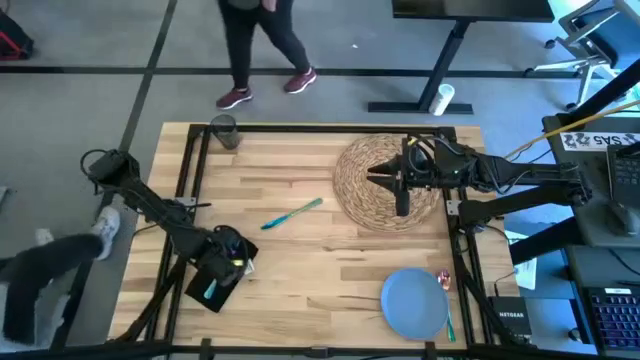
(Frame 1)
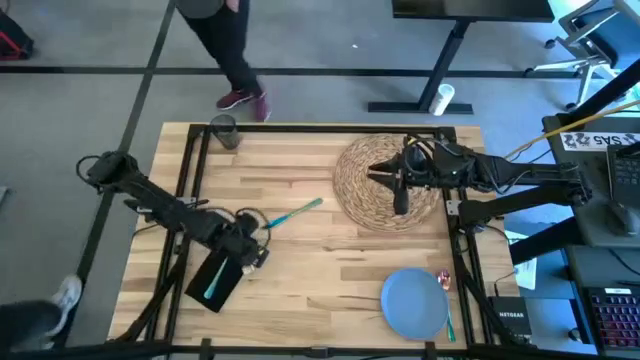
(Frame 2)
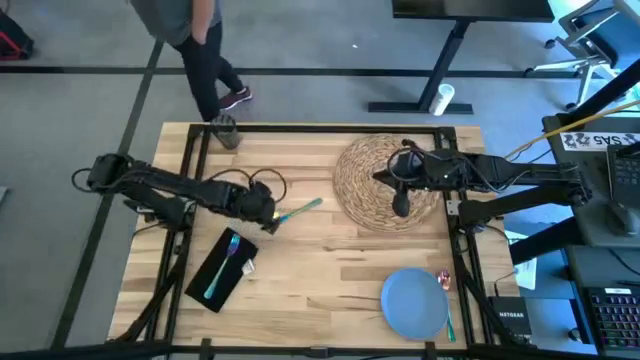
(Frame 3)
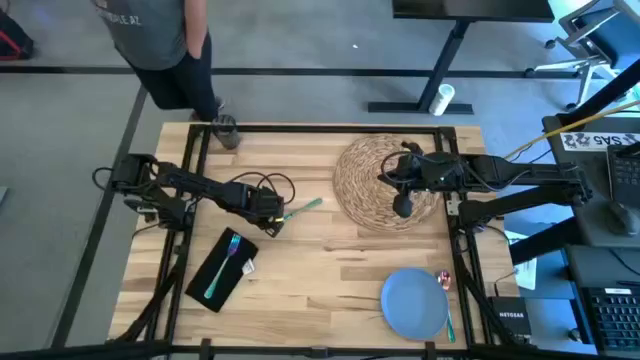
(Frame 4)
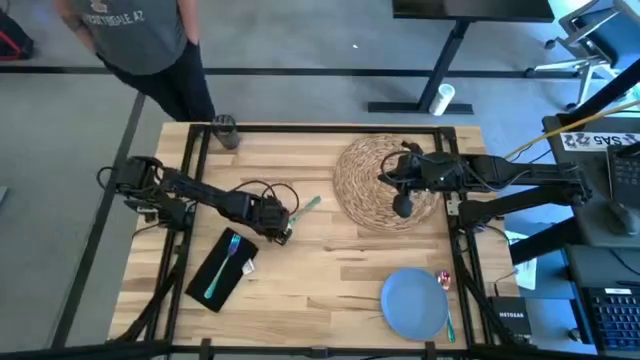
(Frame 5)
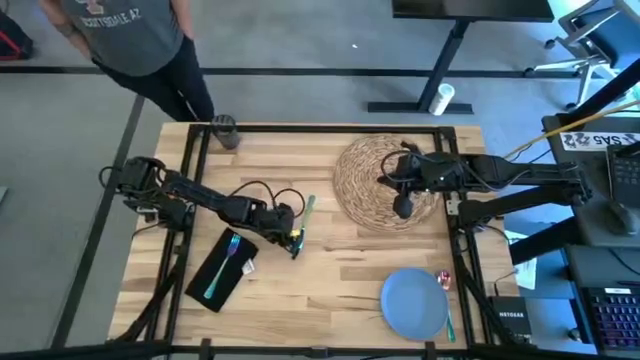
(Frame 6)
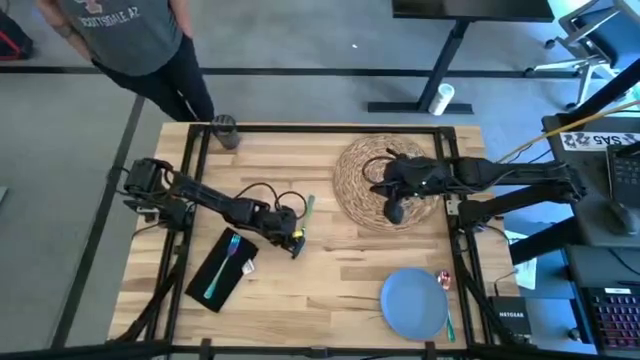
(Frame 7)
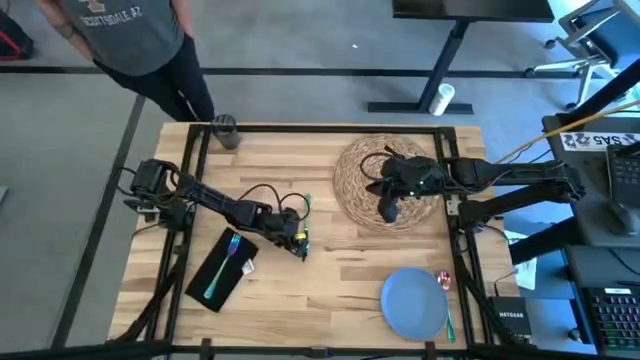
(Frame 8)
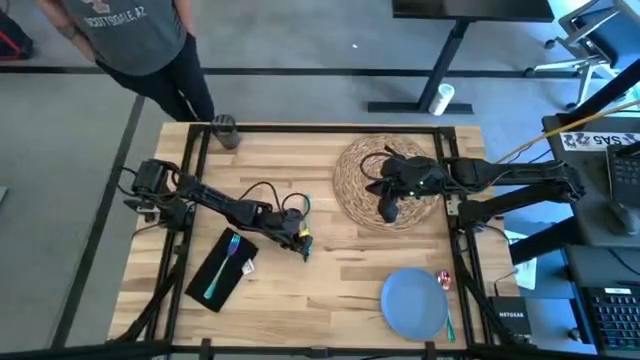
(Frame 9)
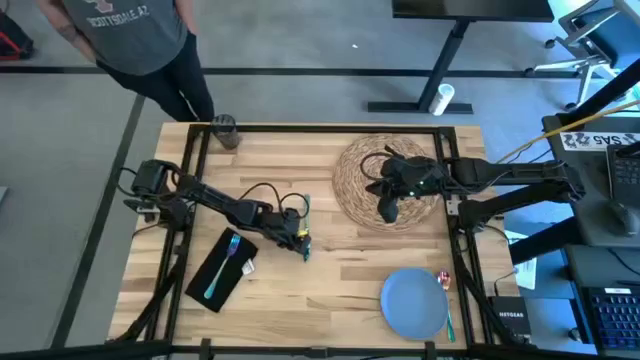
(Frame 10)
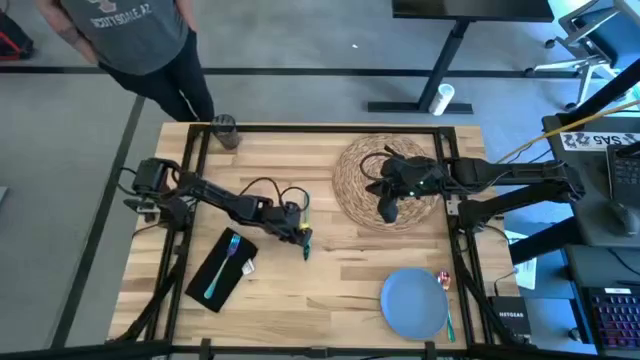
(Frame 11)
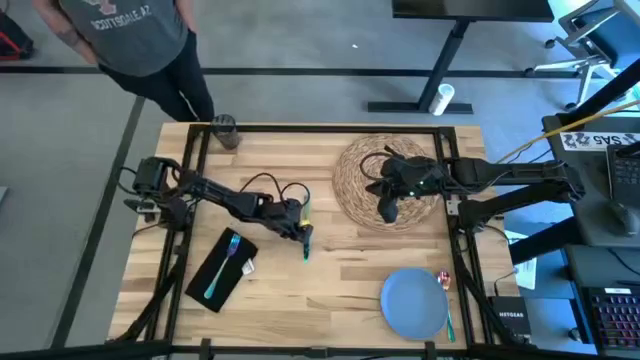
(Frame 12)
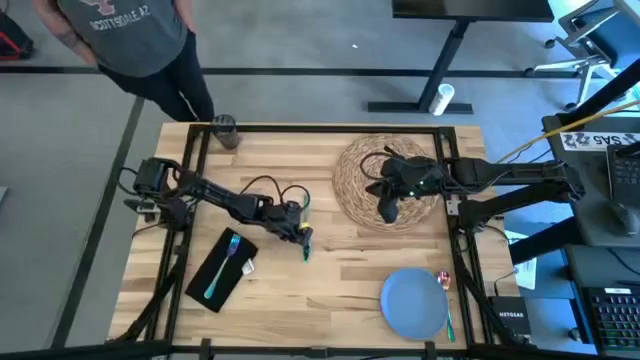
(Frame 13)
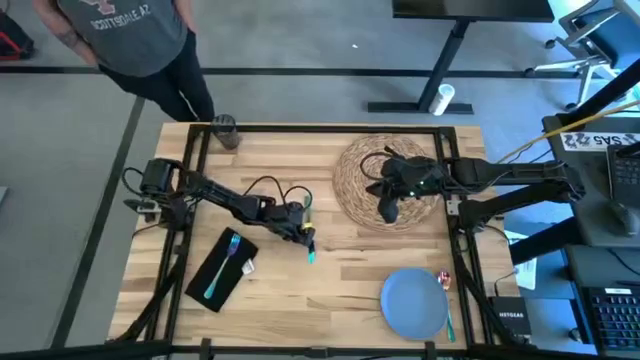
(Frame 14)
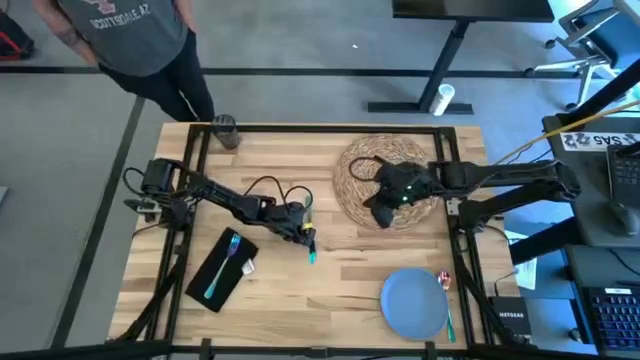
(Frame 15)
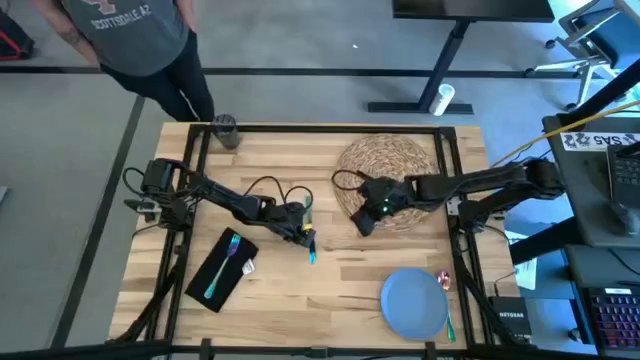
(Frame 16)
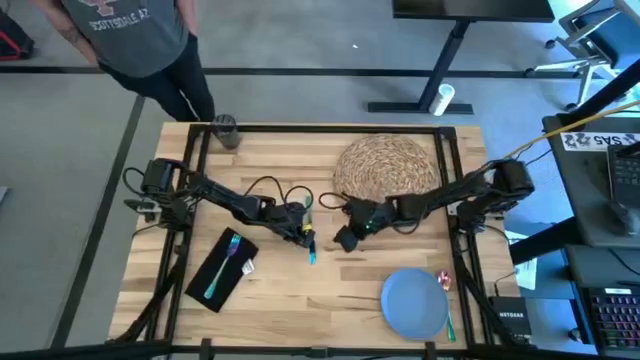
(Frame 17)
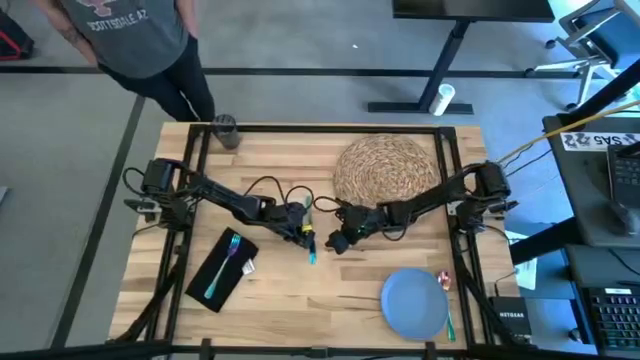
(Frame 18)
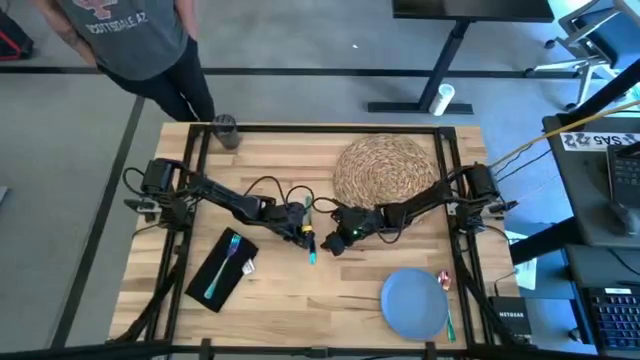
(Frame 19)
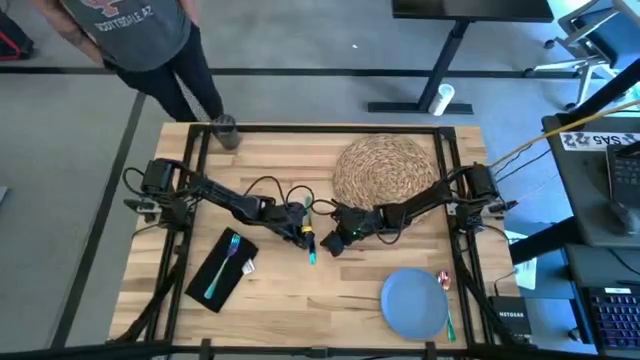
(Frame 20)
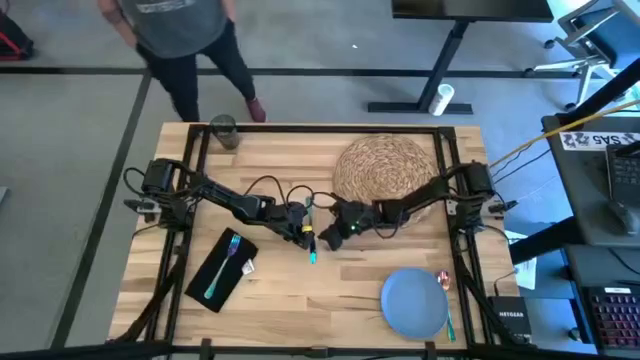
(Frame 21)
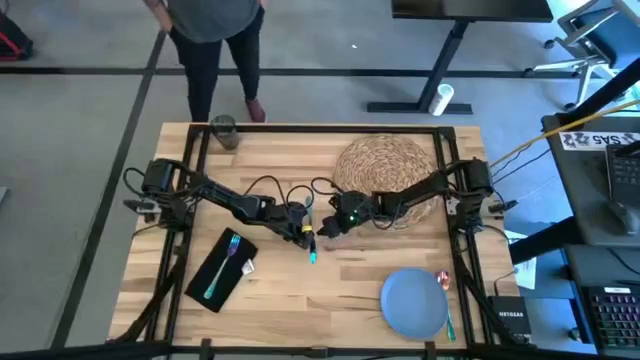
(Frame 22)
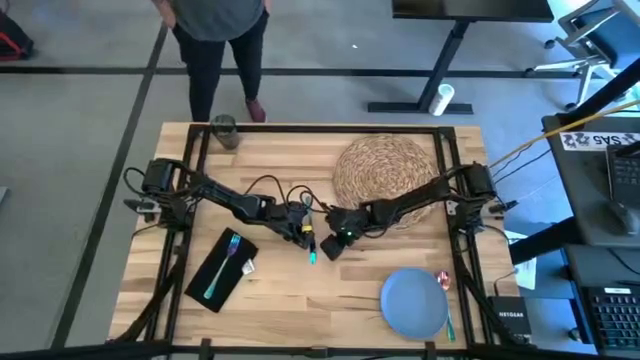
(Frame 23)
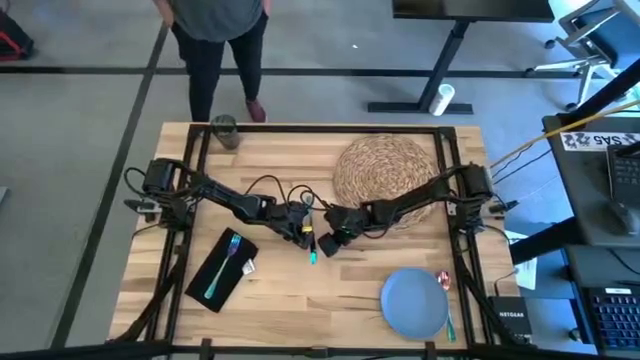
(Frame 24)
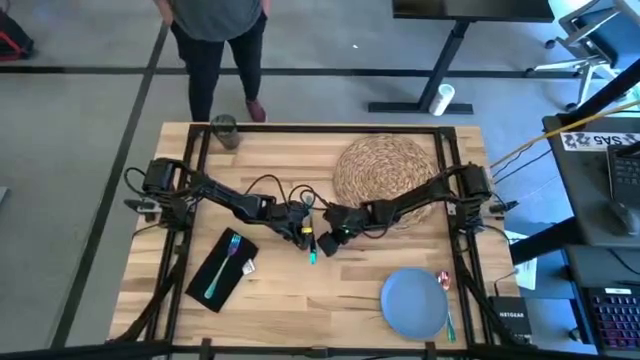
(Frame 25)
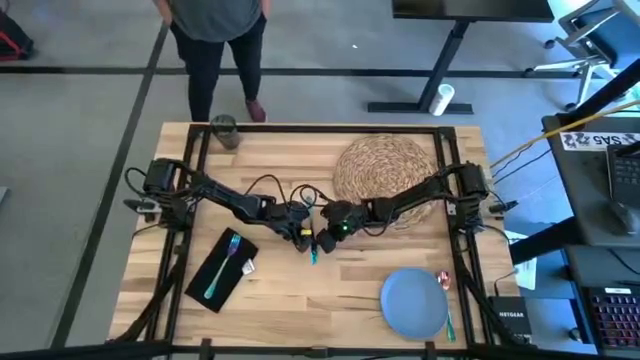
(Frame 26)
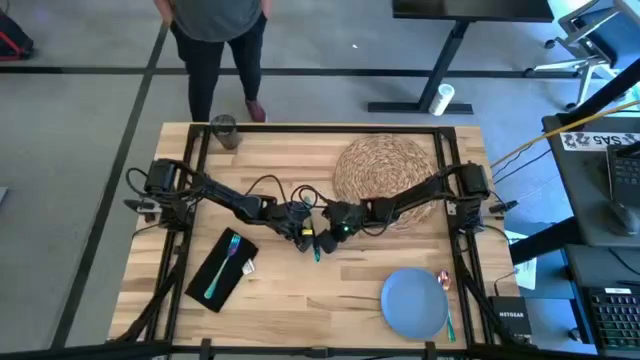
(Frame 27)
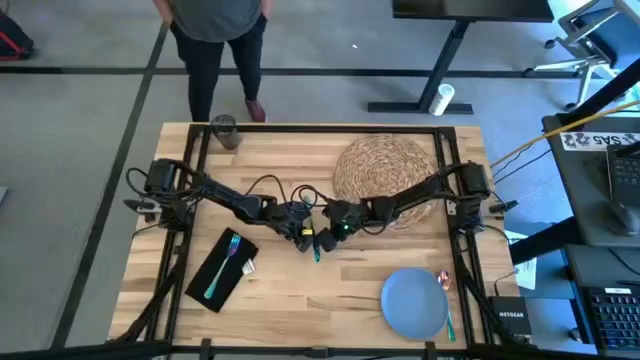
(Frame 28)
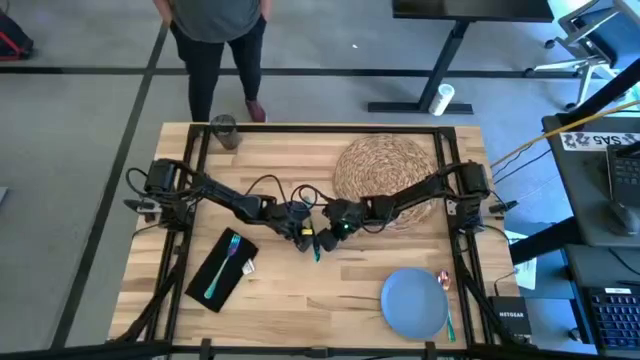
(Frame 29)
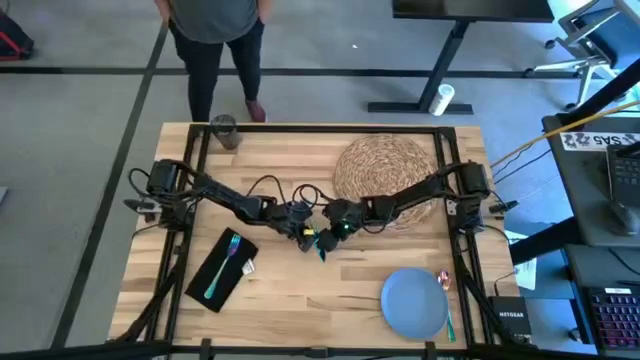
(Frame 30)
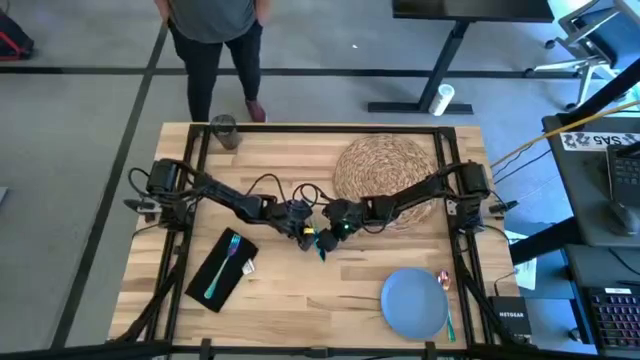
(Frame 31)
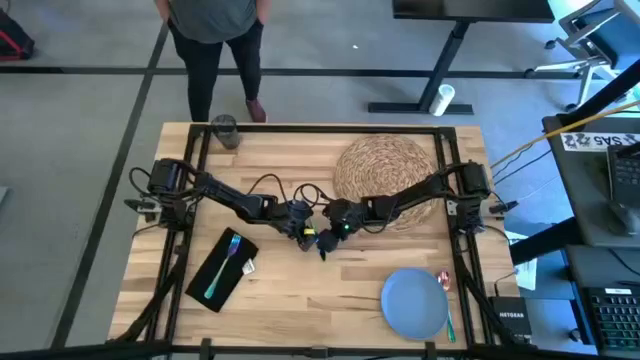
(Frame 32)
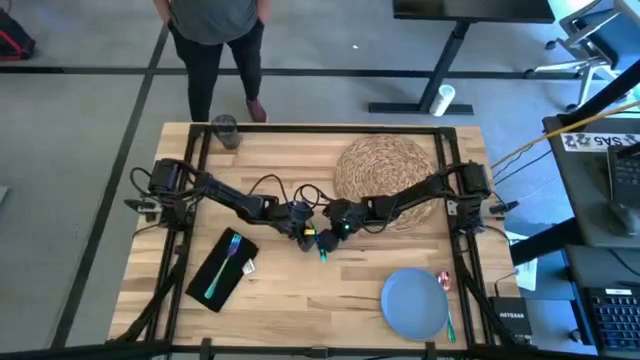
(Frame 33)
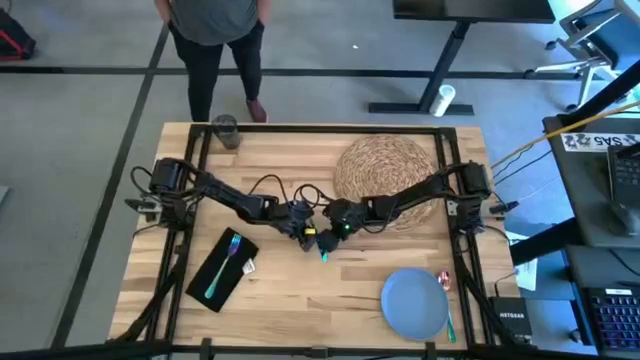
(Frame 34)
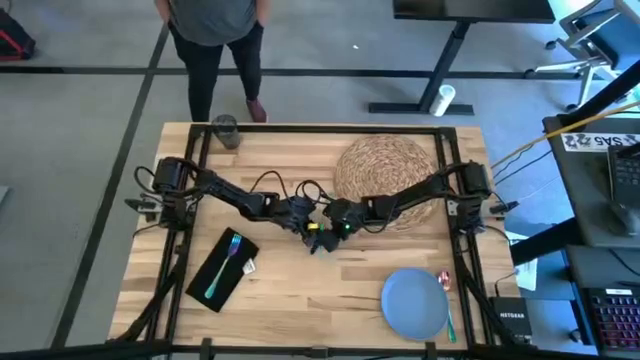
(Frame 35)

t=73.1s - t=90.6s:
Task: Set table place
Put the blue knife on the brown placemat

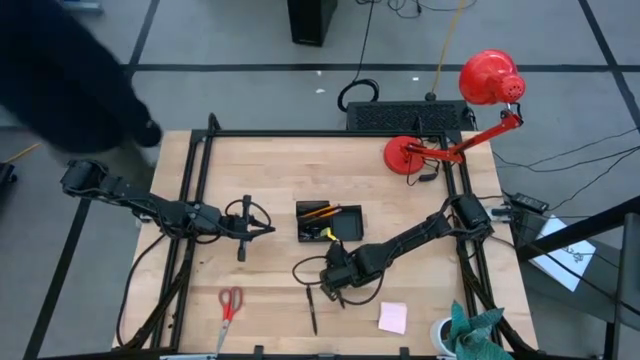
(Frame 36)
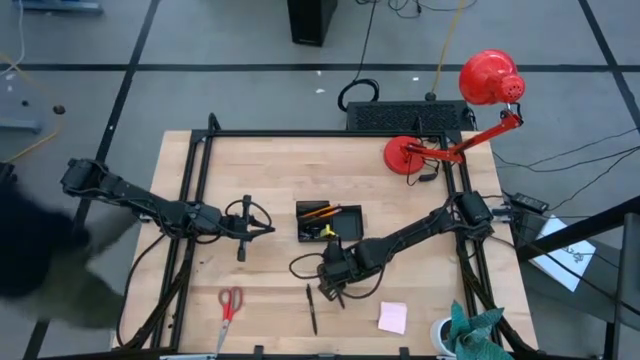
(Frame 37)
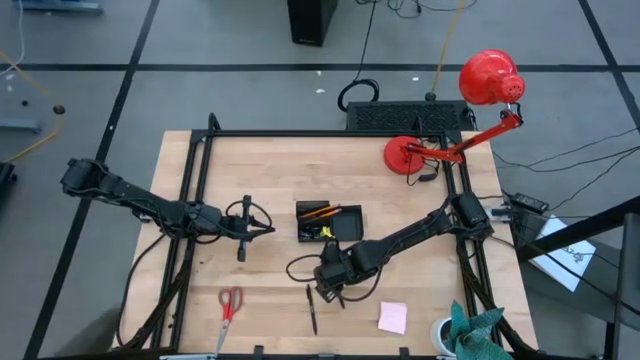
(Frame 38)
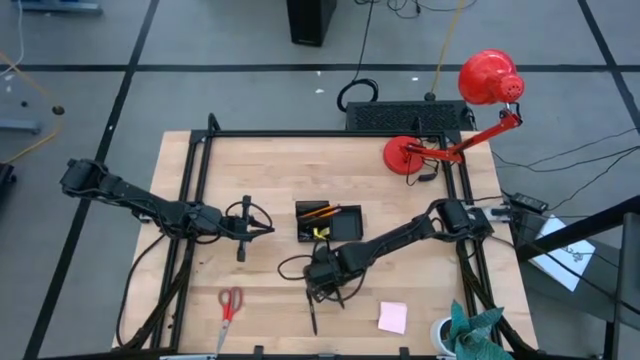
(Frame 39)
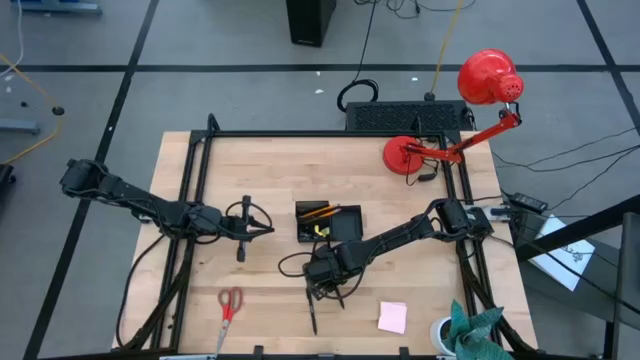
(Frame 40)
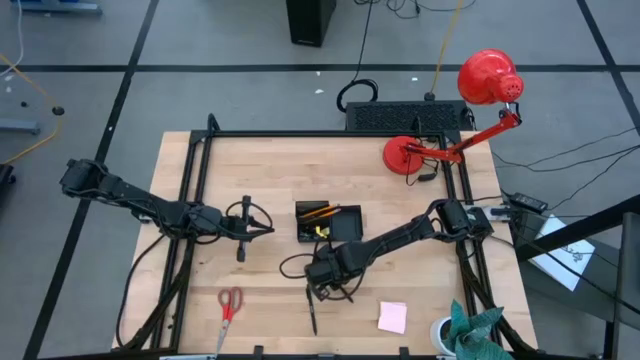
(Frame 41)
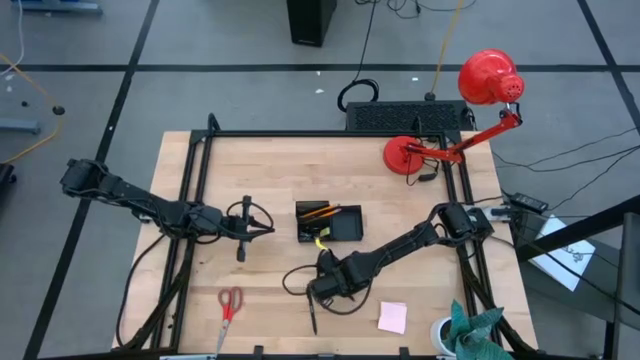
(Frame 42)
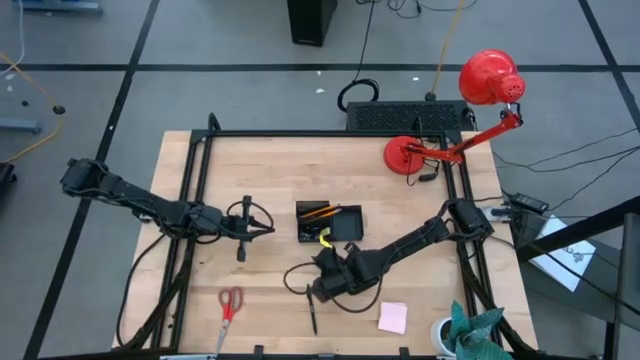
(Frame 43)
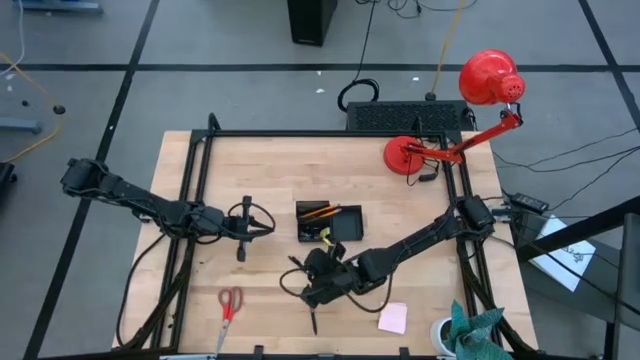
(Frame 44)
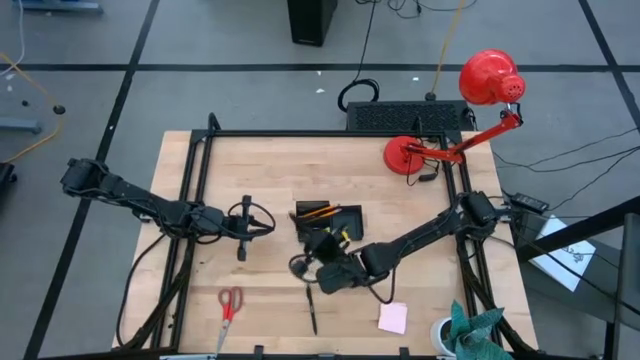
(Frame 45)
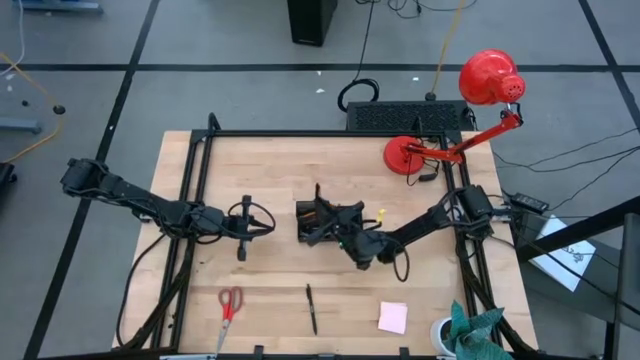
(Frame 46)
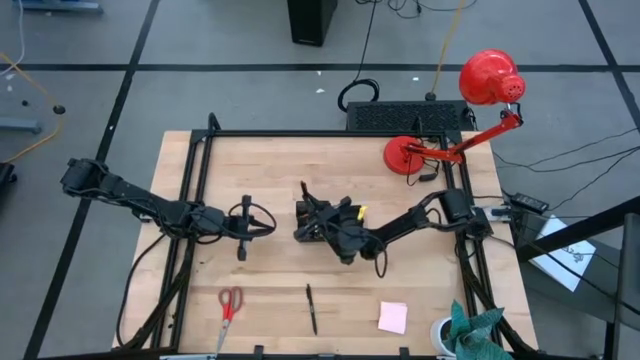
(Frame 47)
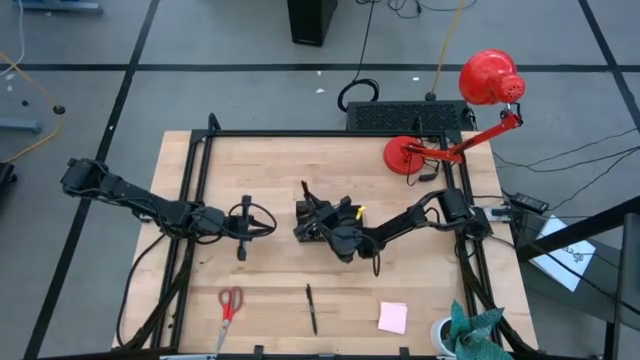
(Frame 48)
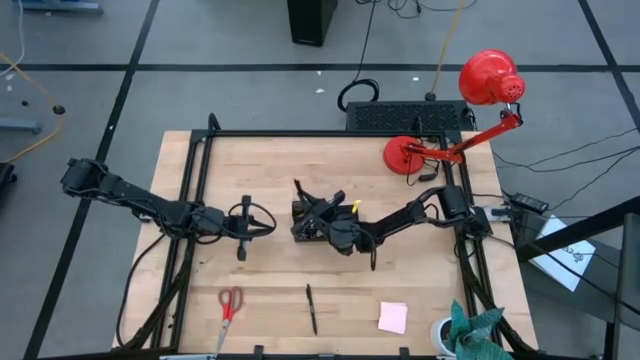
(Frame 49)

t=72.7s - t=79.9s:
Task: Pick and place office supplies into organizer
Put the black pen into the desk organizer
